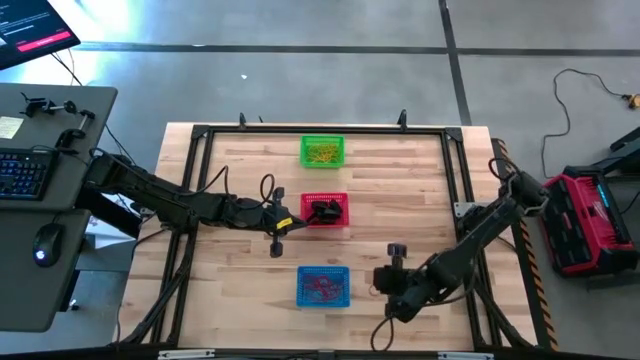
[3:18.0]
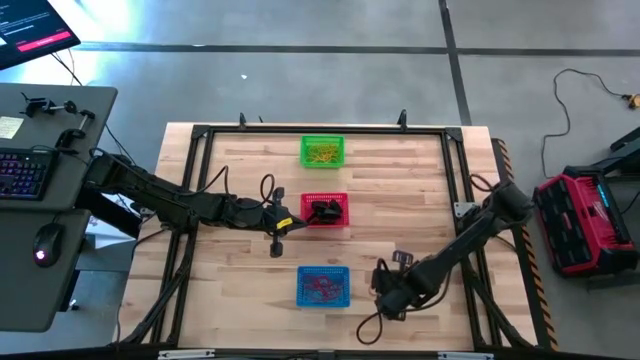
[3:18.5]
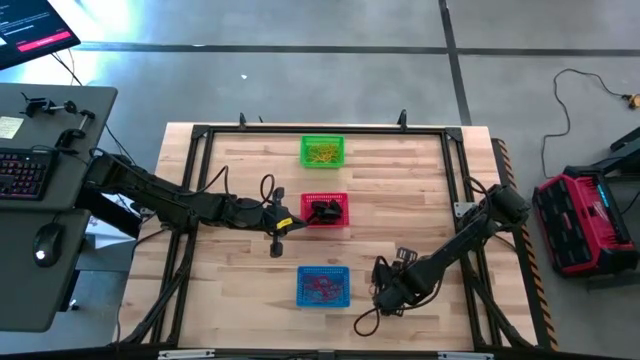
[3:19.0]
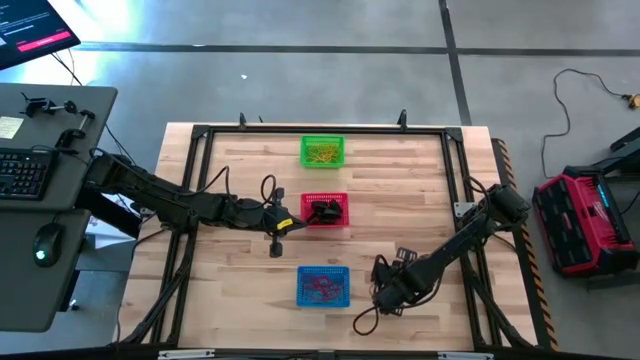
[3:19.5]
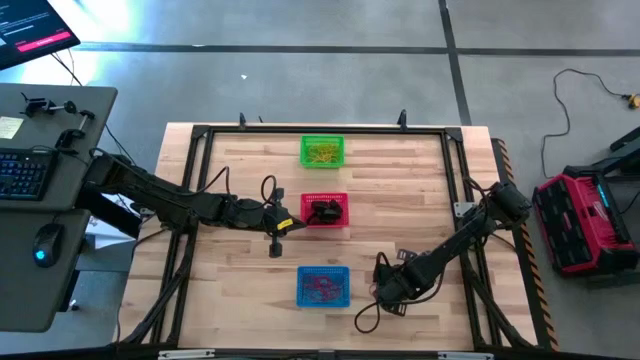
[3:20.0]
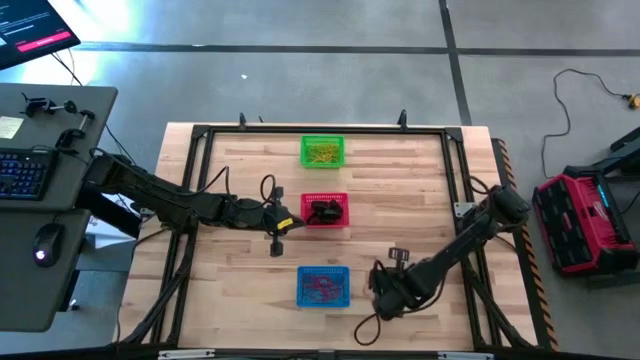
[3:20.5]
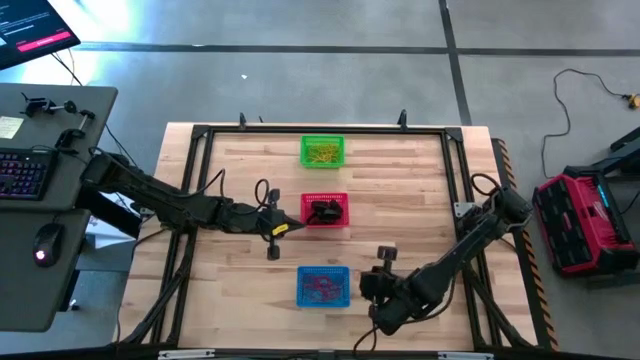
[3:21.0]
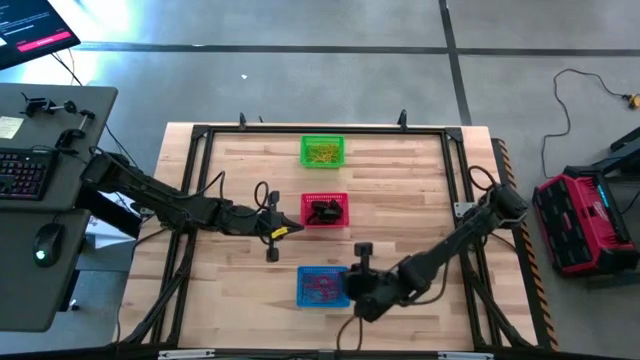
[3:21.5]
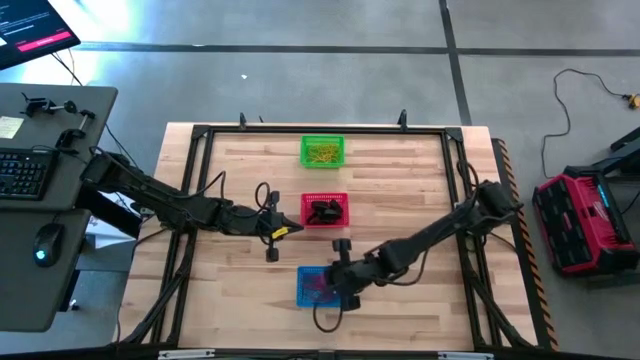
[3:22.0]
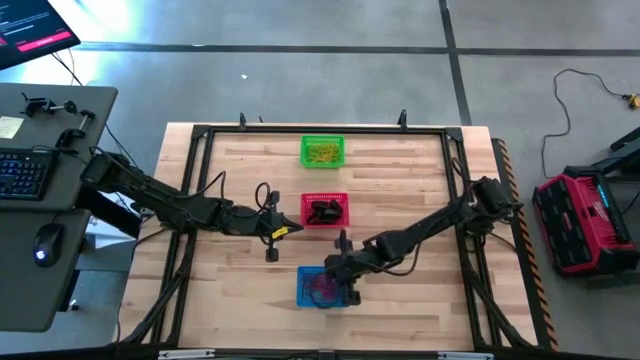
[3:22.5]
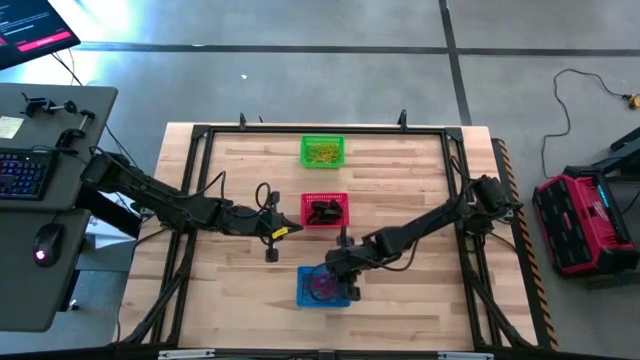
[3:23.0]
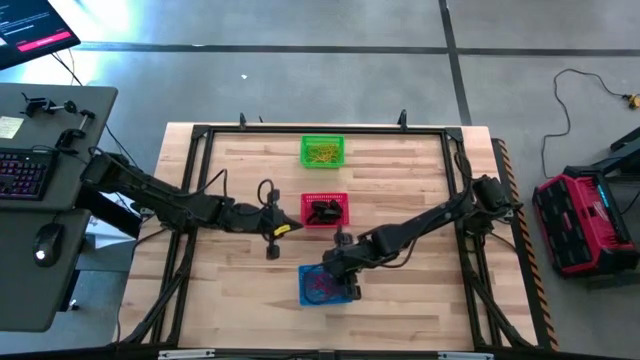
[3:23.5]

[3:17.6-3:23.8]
Task: Sort rubber bands into baskets
Put the red rubber band into the blue bin

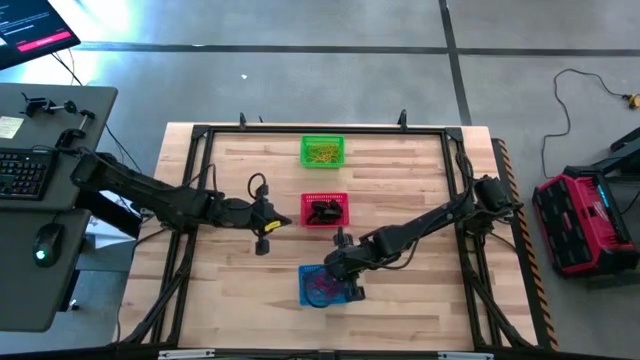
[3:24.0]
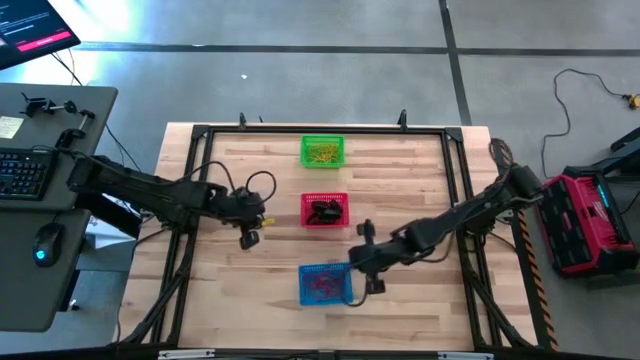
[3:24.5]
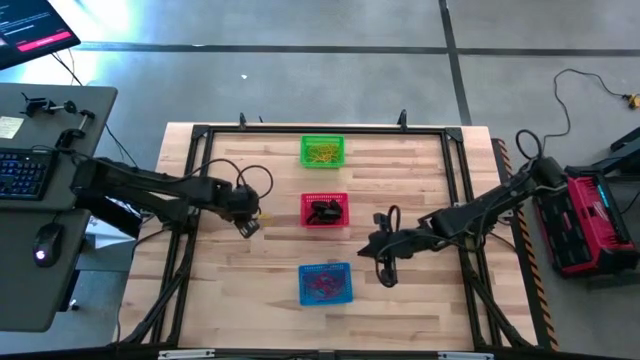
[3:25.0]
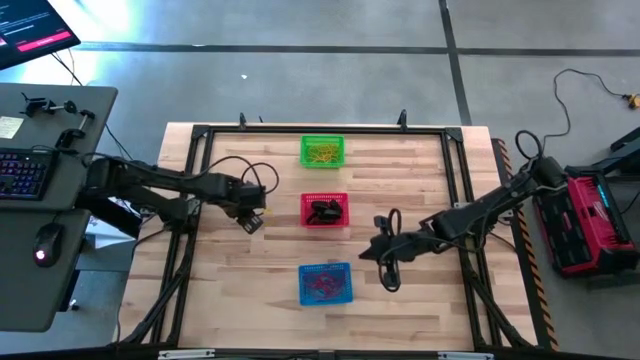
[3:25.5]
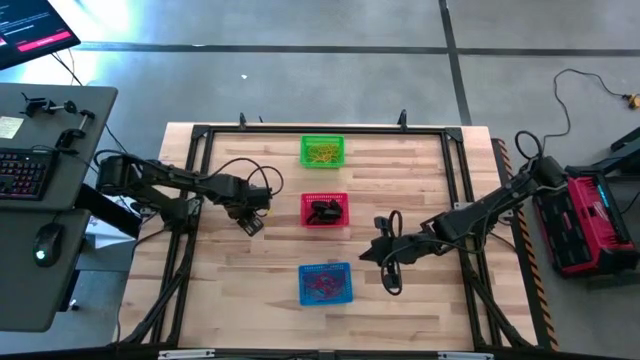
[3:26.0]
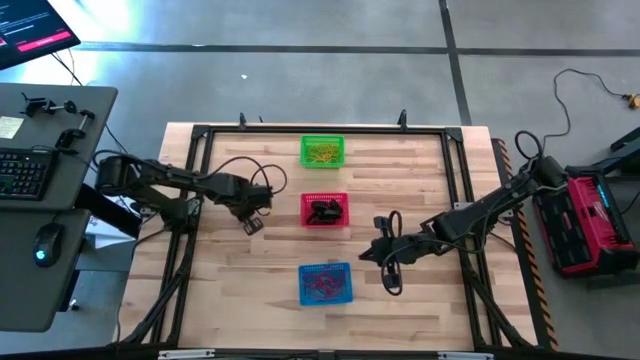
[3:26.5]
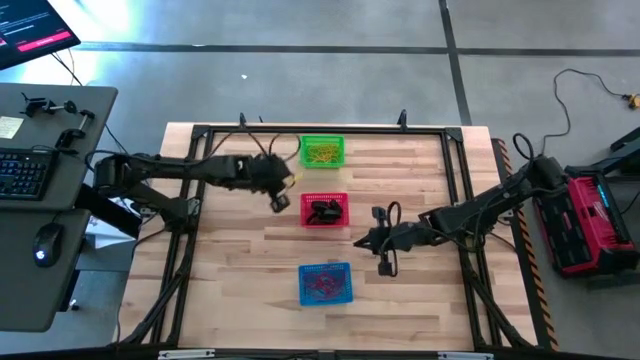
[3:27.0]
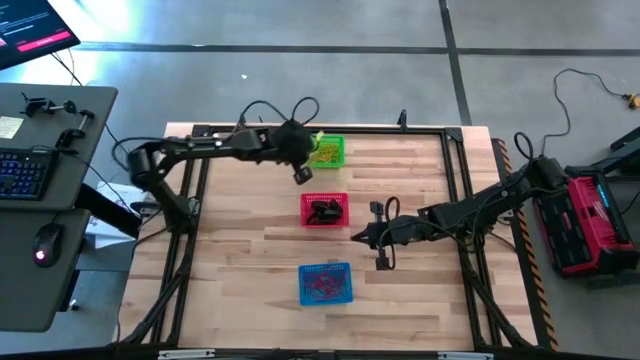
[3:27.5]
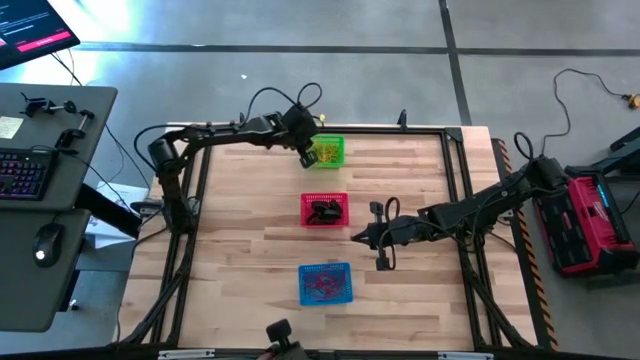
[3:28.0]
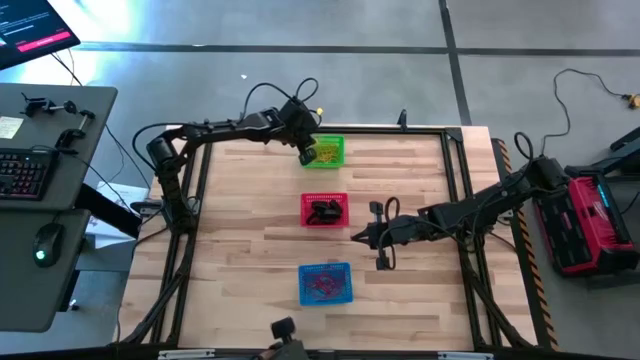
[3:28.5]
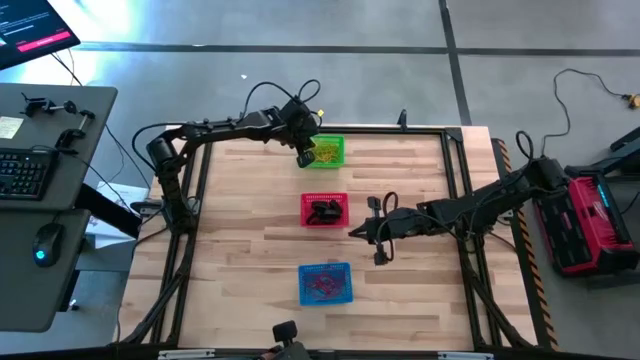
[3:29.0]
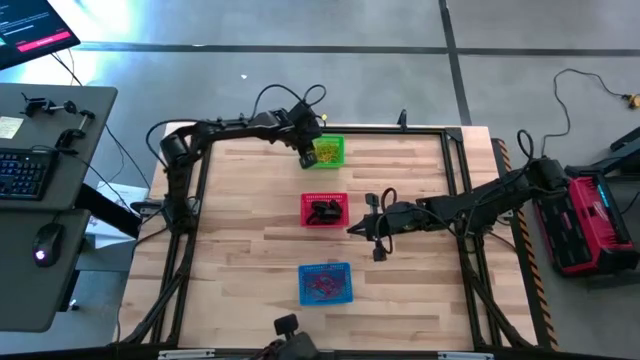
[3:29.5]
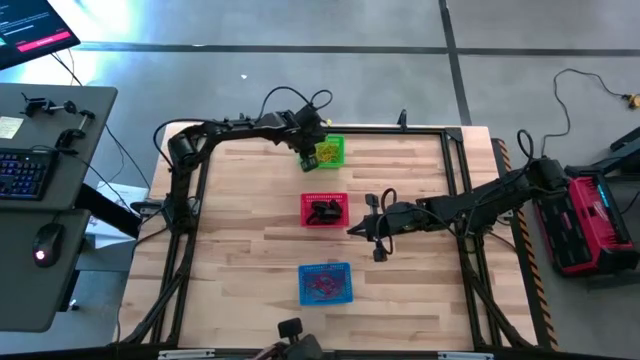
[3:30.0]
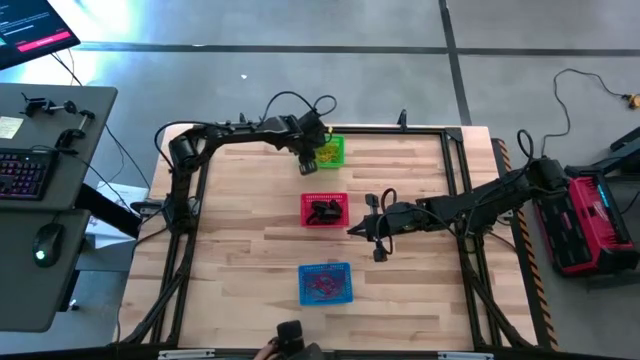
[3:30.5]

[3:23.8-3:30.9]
Put the yellow rubber band into the green bin

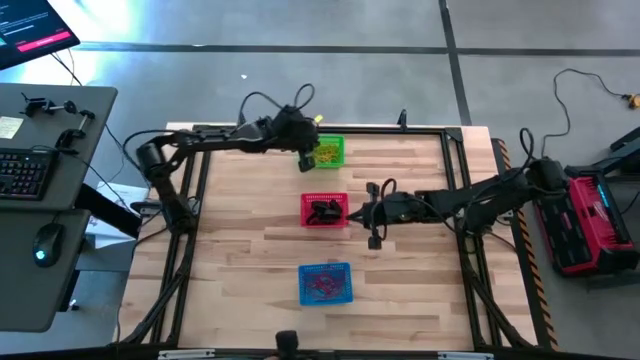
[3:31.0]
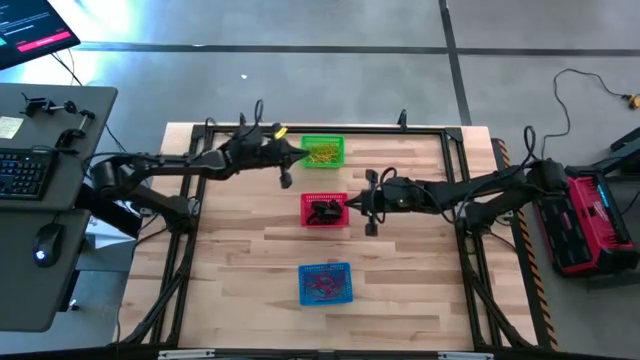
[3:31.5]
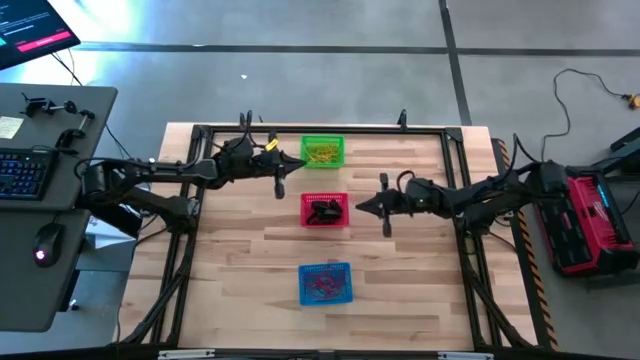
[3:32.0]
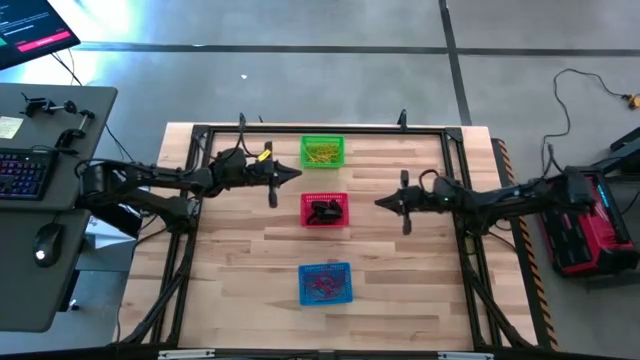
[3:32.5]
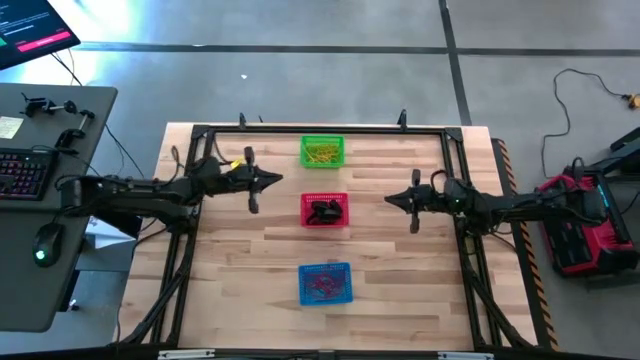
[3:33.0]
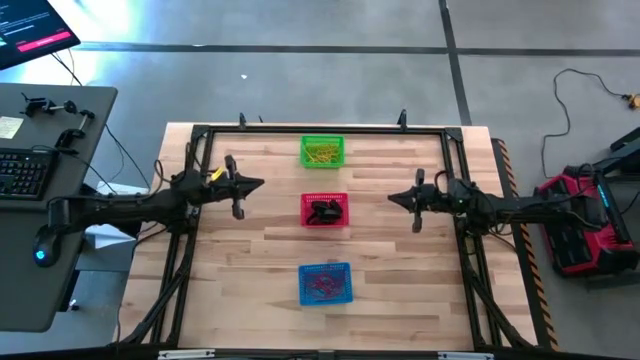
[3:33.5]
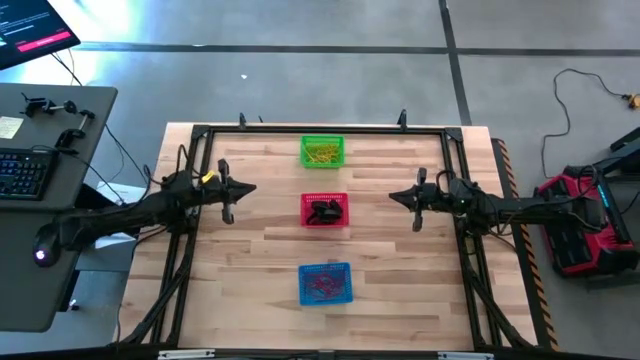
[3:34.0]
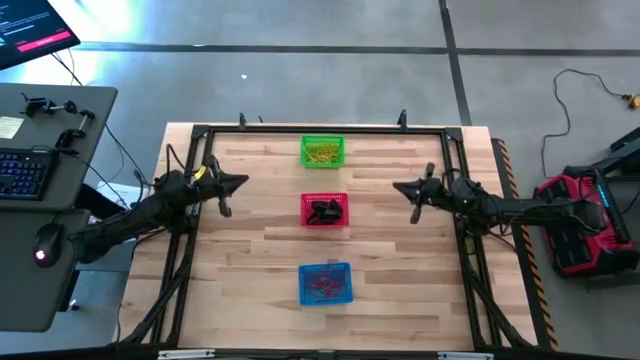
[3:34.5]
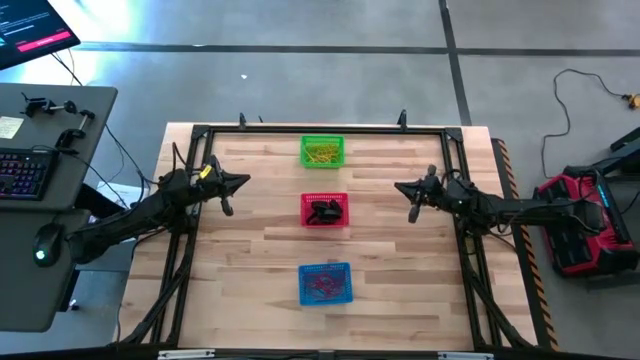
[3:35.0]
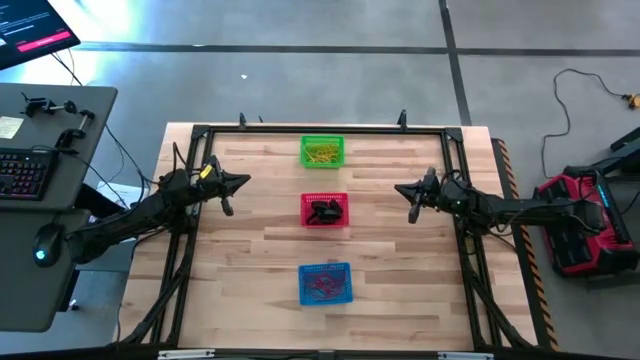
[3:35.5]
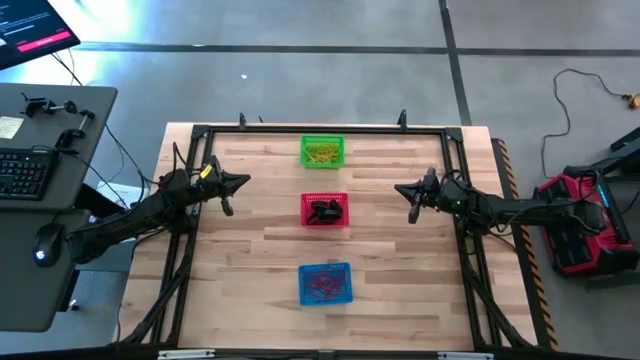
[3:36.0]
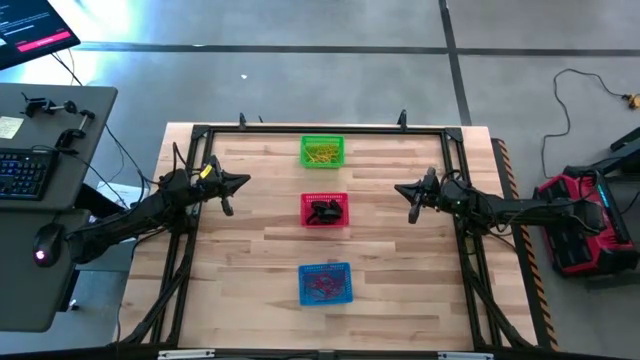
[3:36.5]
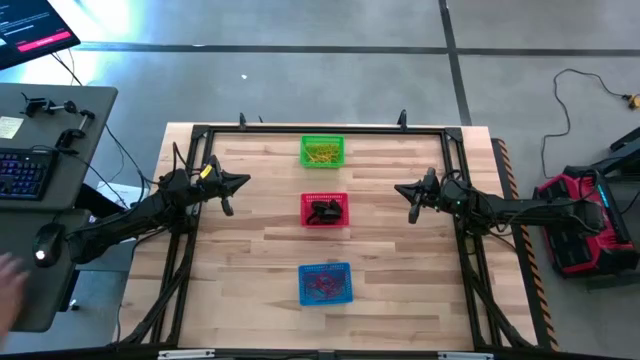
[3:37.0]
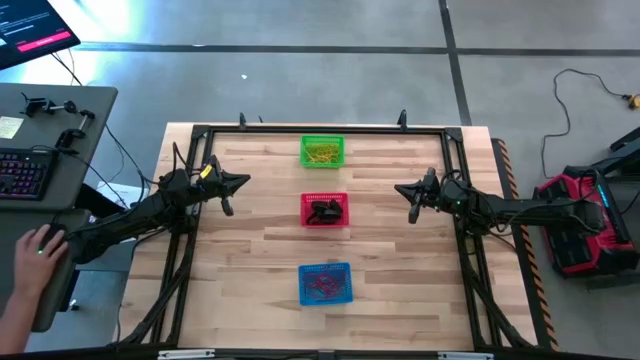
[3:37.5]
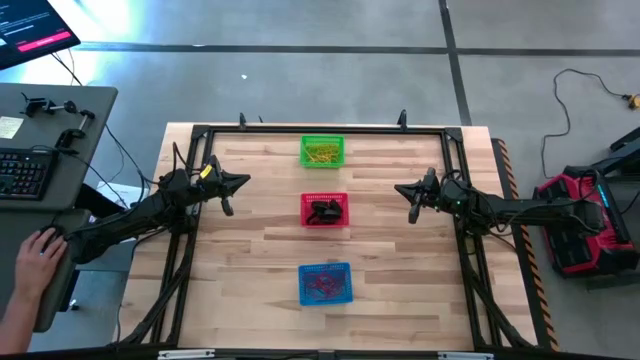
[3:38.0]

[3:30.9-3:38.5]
Return to Home Position
